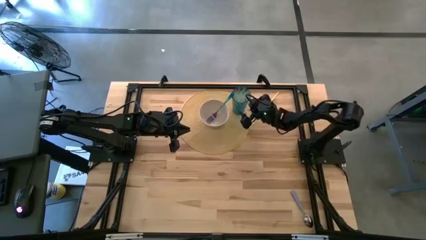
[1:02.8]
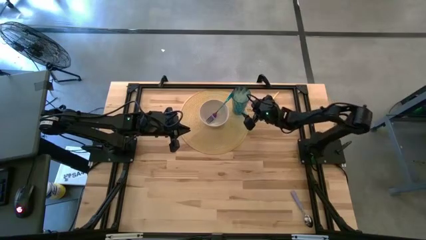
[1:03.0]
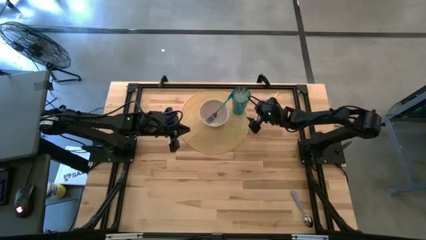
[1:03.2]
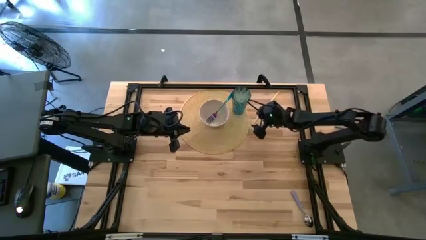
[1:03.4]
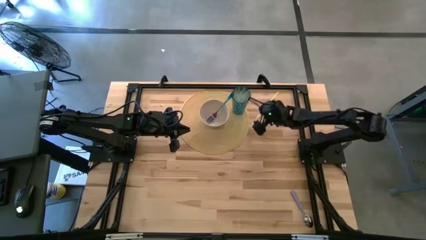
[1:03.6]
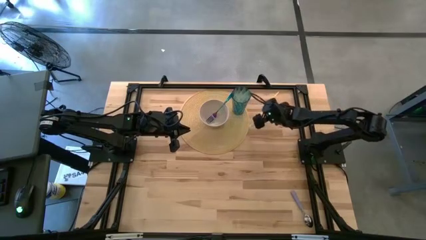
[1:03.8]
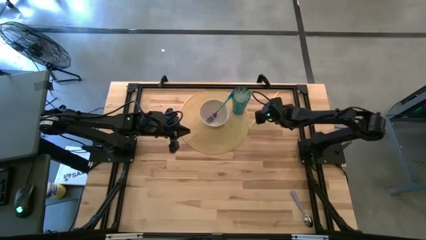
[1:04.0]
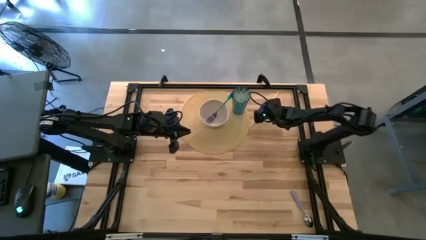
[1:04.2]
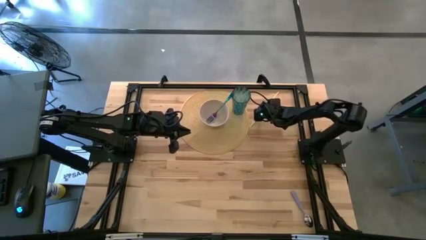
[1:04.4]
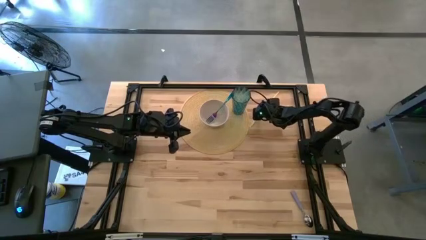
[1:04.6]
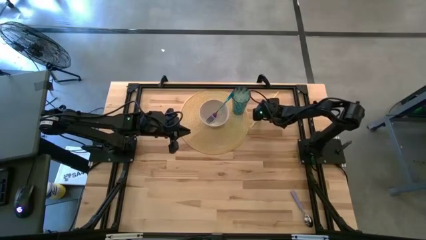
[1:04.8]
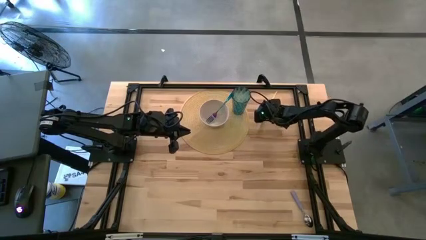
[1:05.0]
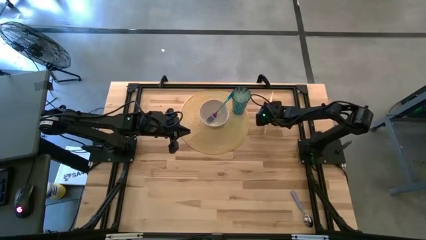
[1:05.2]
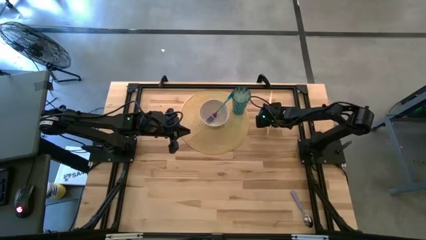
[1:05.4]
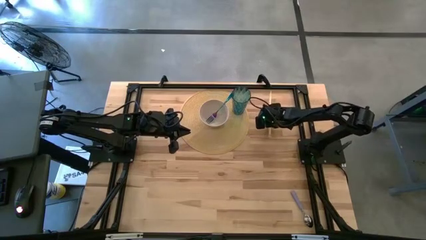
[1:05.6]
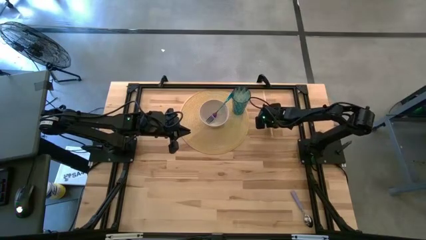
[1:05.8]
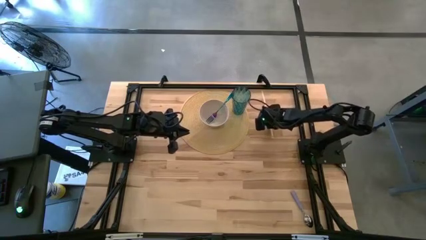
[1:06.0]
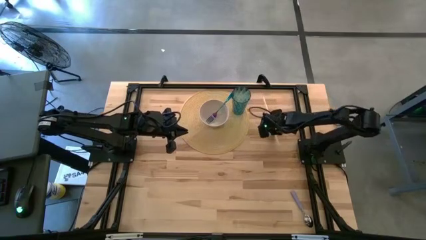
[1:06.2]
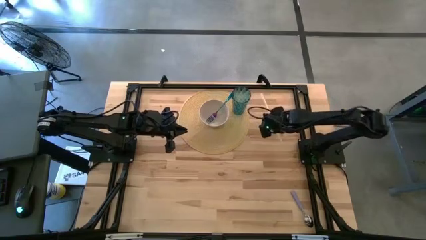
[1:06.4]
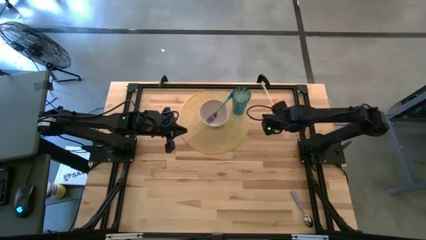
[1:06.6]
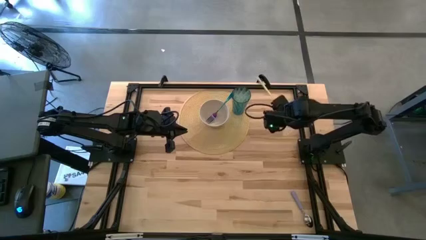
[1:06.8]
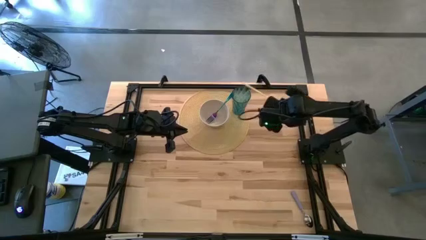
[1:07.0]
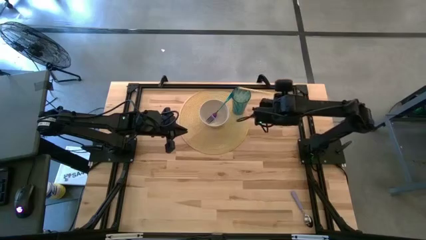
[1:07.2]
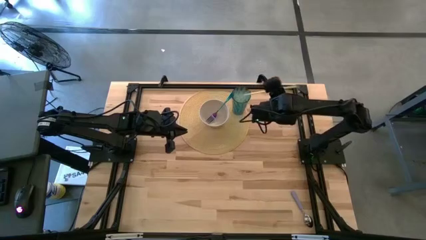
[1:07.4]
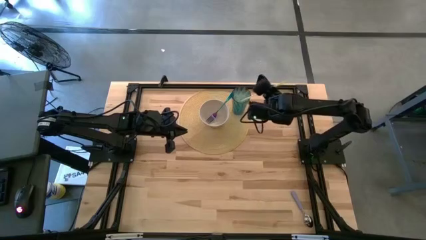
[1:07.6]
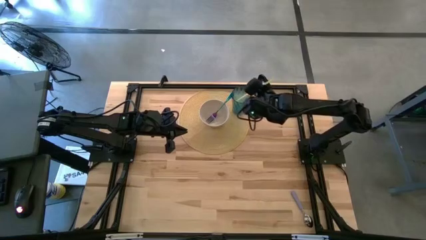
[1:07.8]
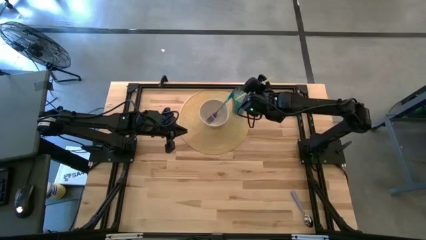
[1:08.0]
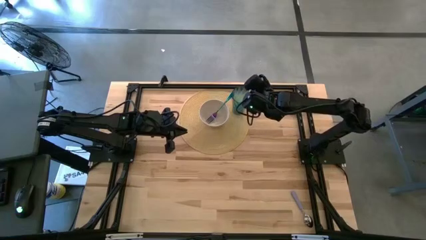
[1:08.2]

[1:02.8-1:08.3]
Task: Pick & Place Utensil
Put the yellow straw into the blue cup

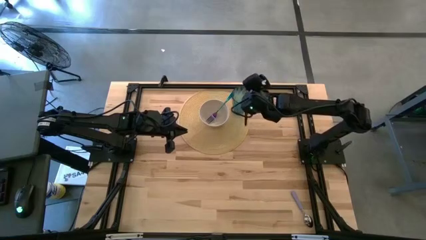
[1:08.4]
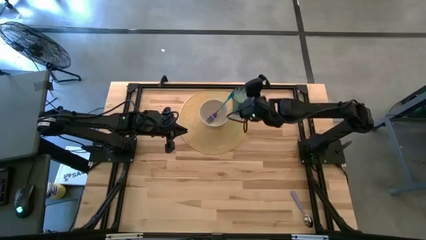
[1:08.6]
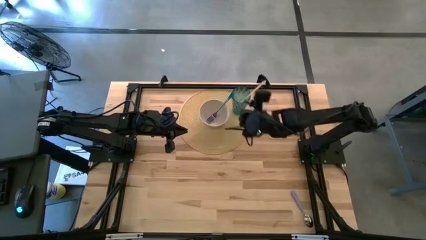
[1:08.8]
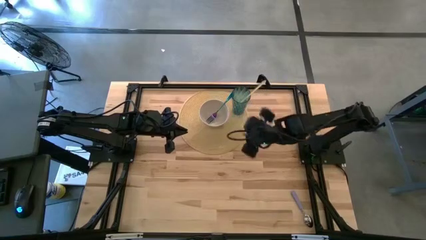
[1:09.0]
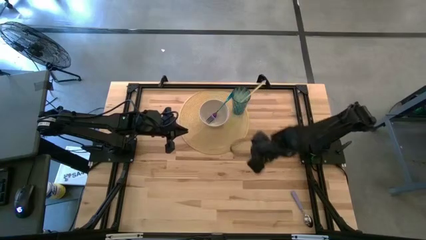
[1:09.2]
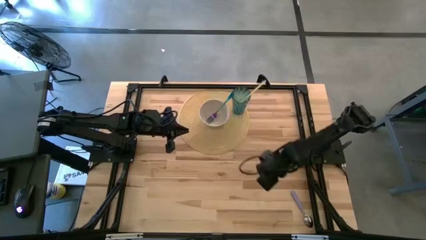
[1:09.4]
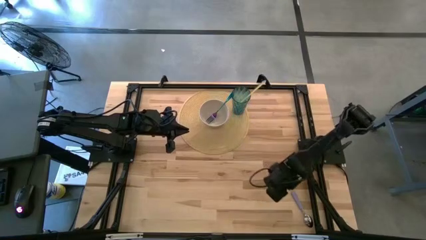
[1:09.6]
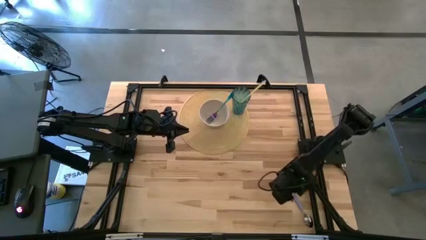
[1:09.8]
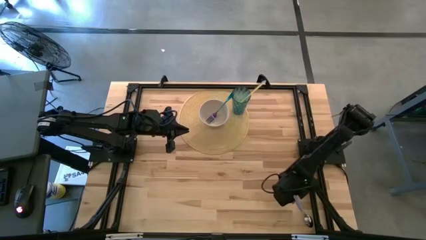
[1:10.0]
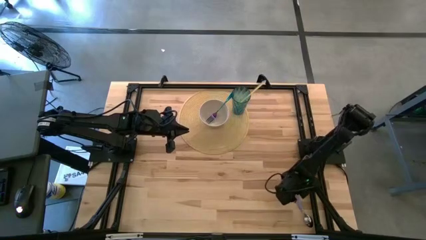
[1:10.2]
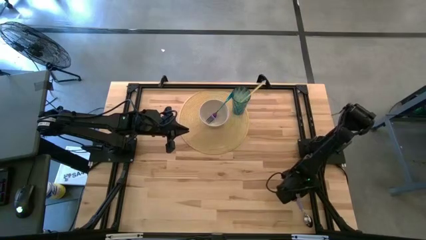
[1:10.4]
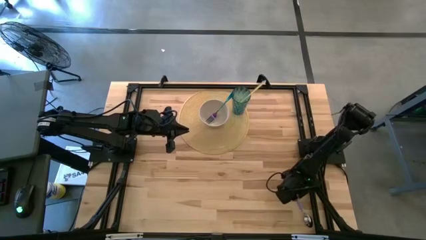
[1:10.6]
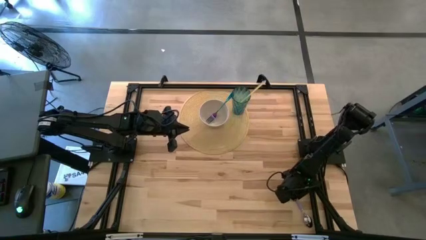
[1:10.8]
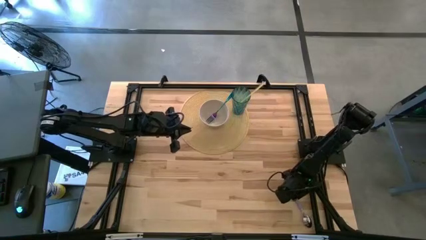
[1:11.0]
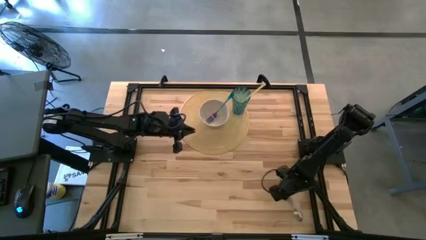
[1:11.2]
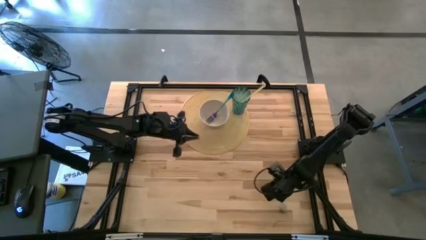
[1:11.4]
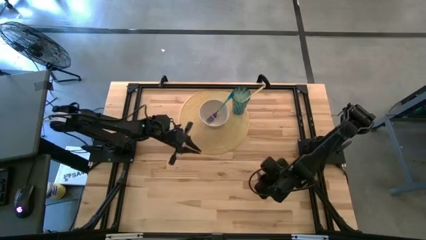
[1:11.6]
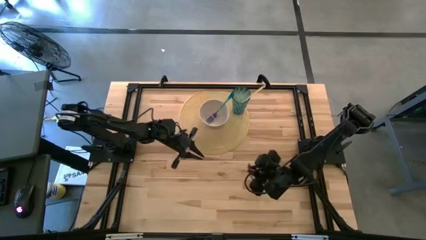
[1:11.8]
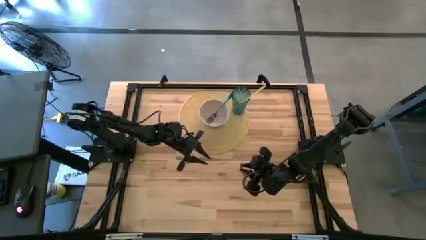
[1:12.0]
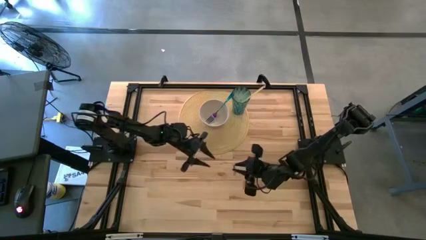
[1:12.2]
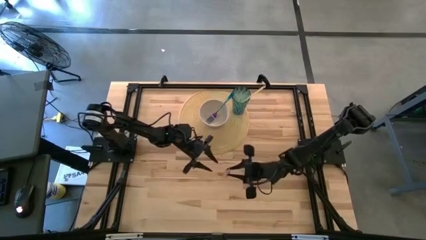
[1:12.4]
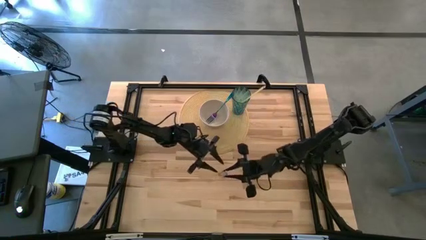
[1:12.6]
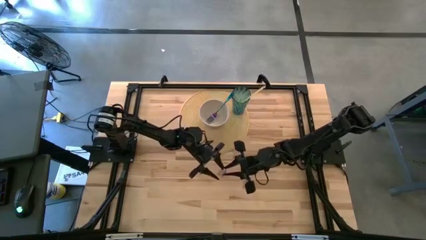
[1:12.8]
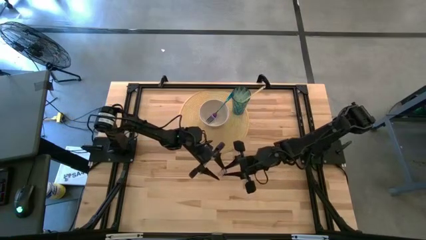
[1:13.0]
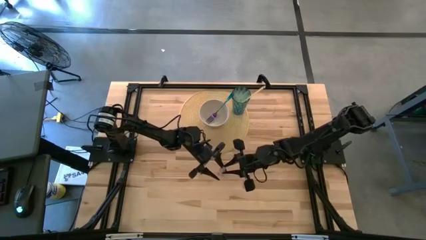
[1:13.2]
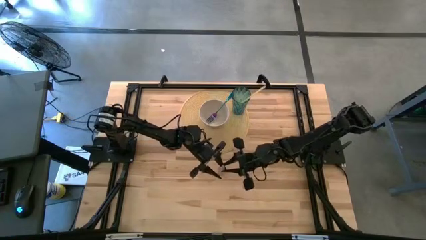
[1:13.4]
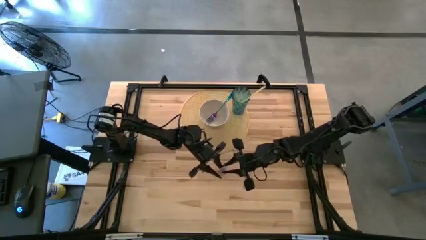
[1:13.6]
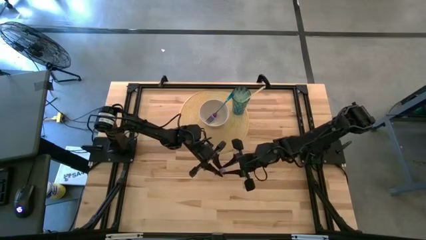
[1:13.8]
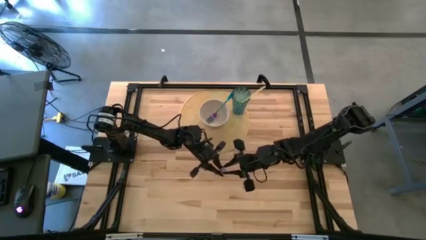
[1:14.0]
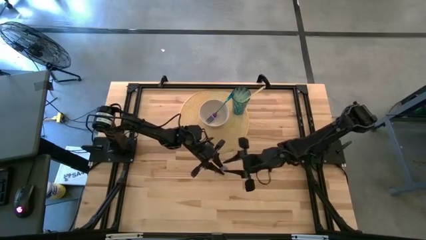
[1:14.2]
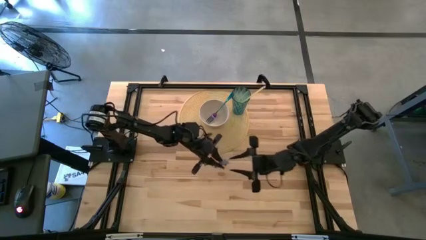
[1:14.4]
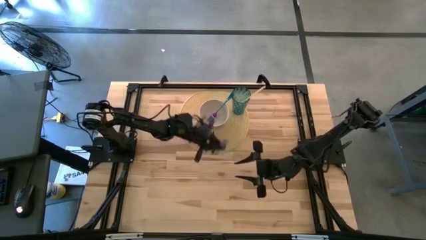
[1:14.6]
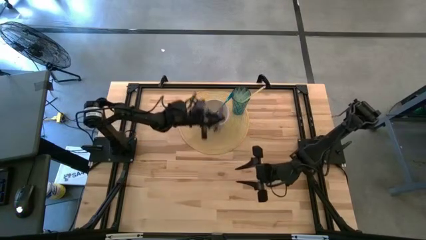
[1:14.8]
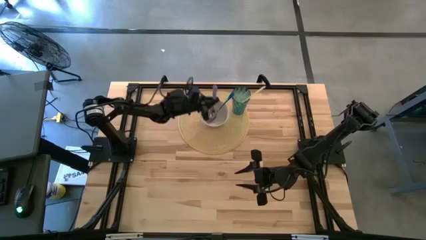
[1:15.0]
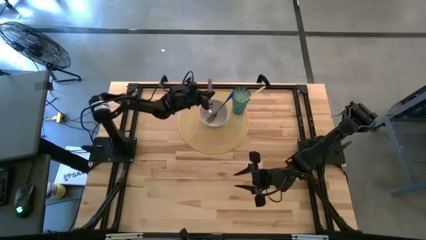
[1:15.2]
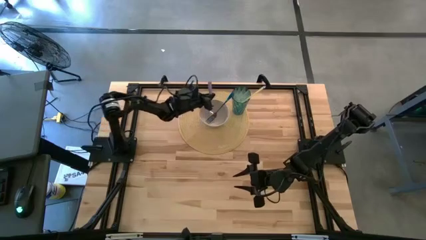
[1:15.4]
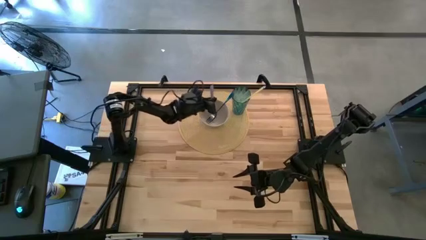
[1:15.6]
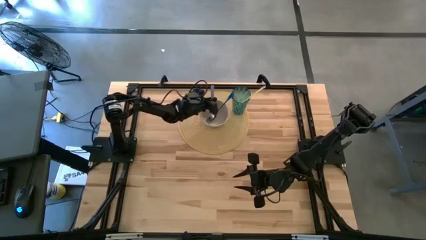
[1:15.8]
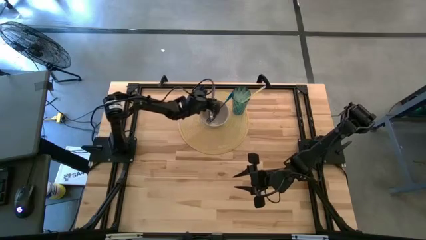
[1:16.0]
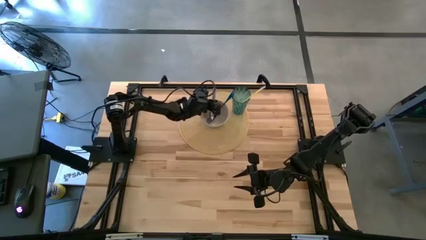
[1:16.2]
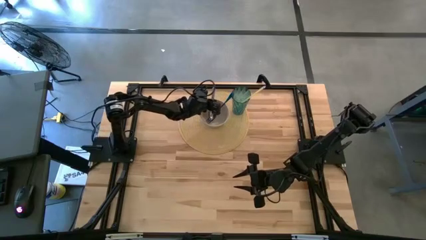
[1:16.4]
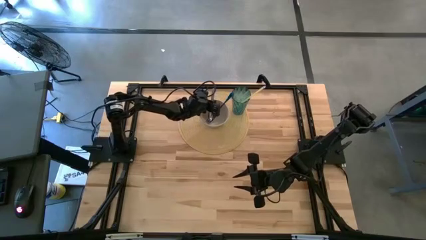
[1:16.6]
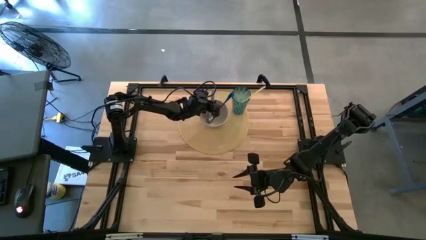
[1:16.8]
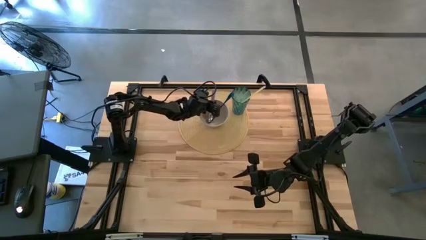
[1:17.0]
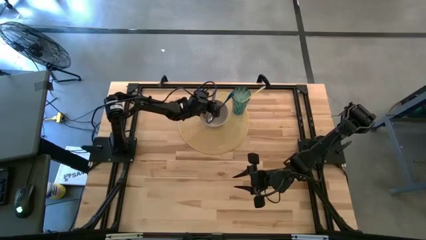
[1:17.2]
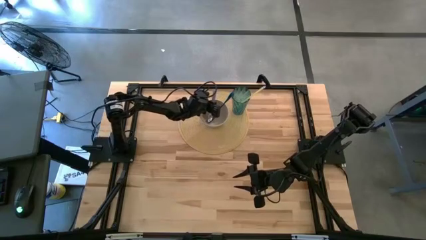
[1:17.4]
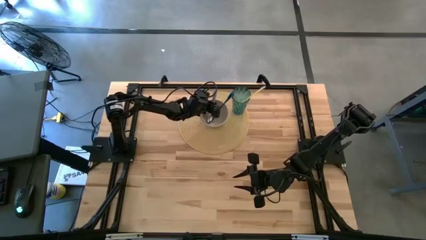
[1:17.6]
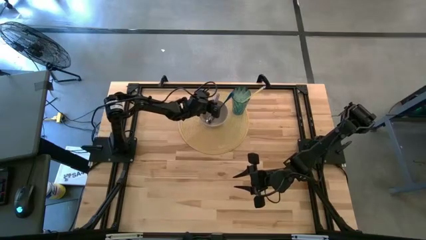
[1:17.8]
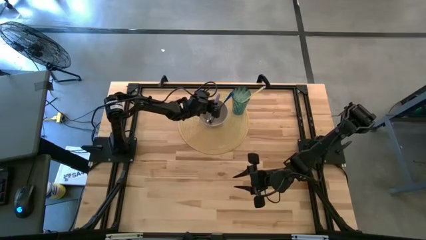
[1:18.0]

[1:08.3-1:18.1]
Put the purple spoon into the white bowl
